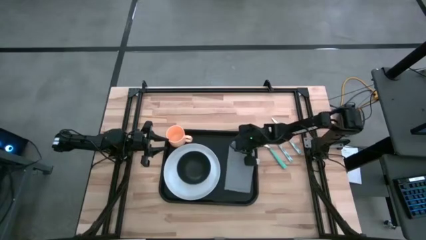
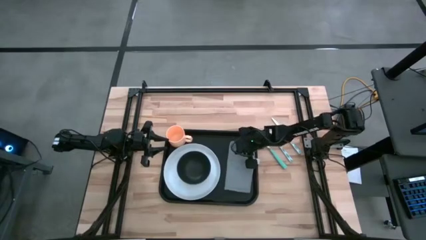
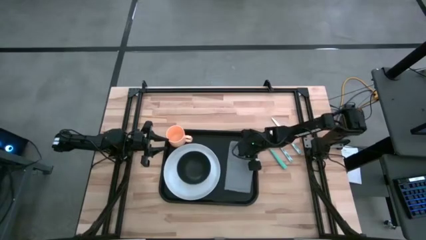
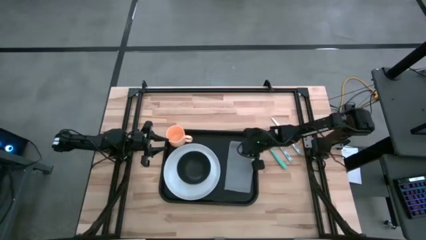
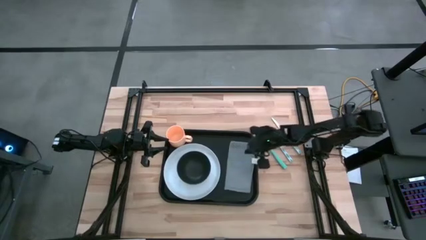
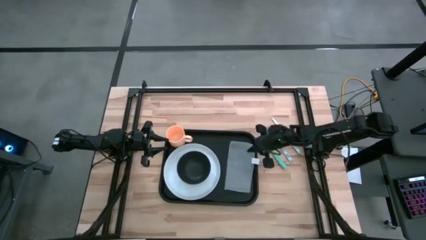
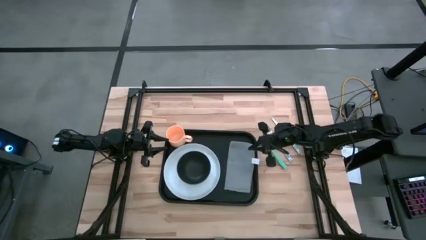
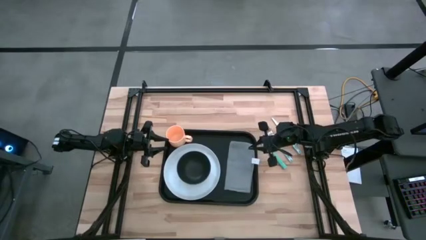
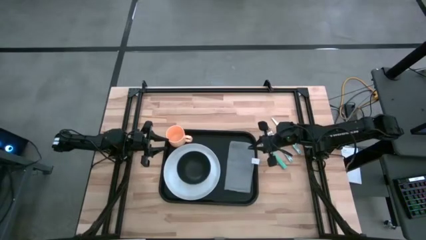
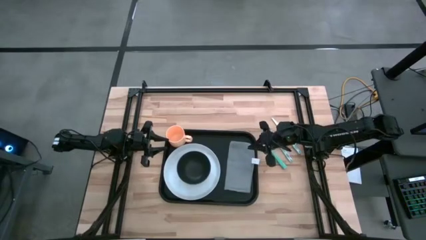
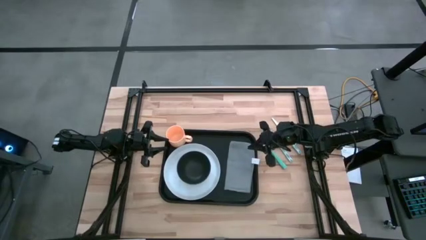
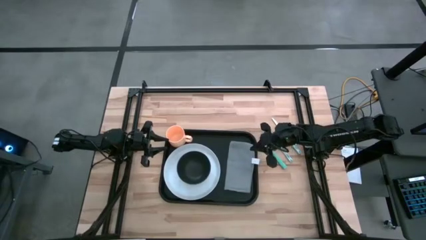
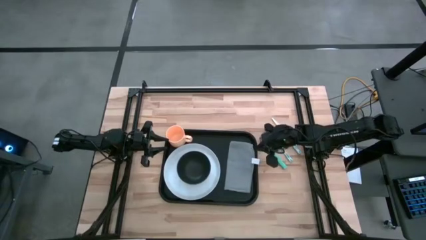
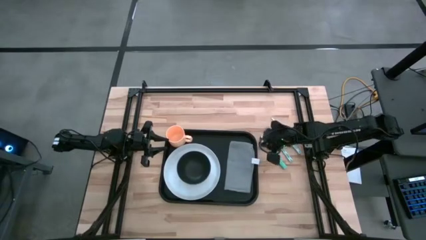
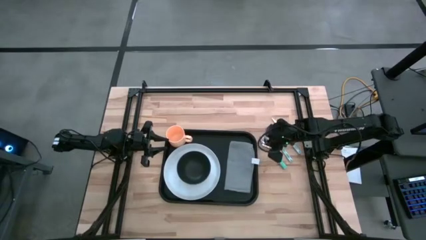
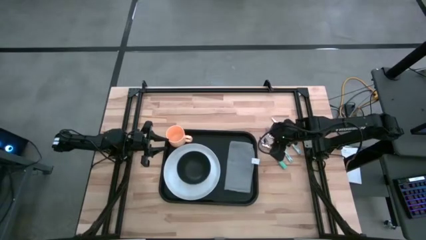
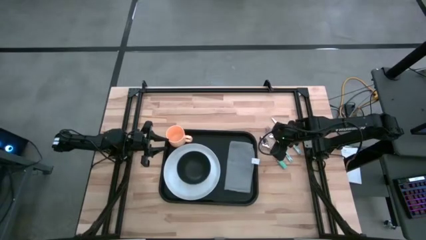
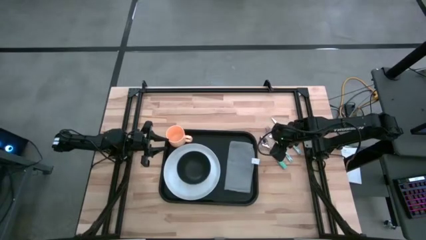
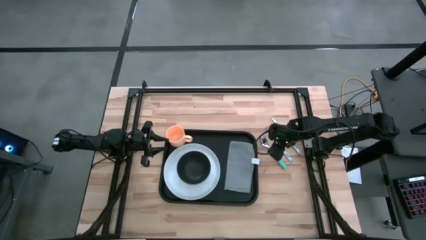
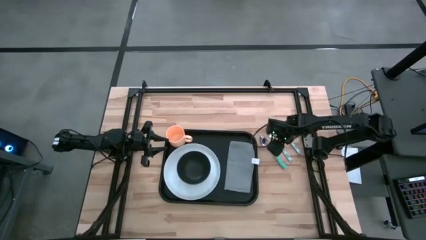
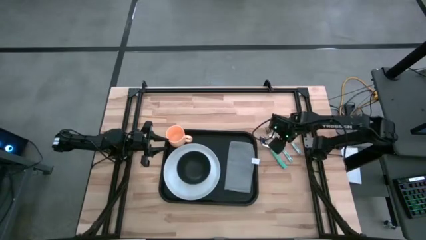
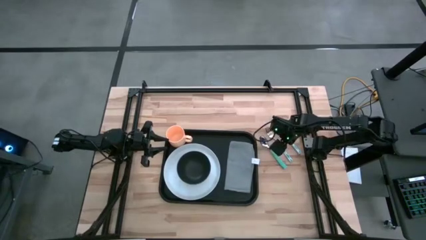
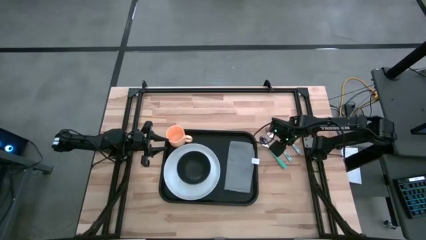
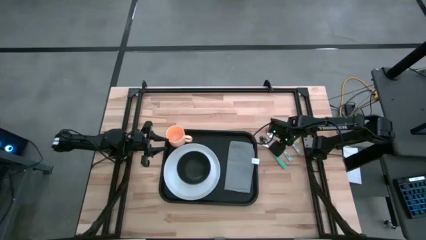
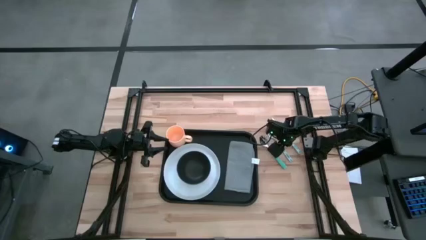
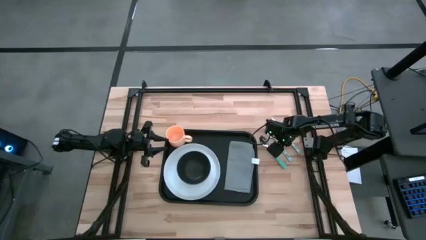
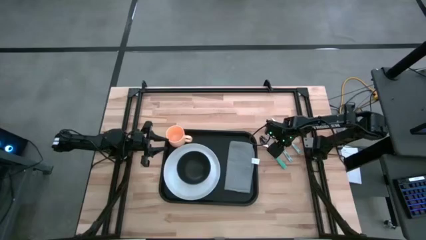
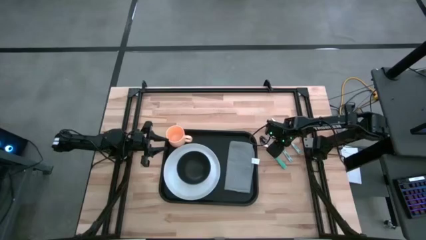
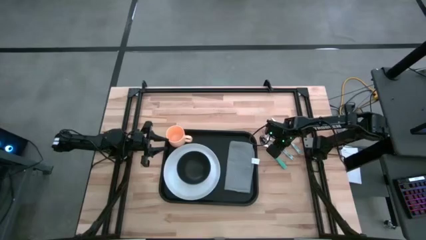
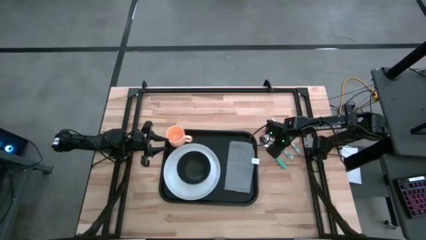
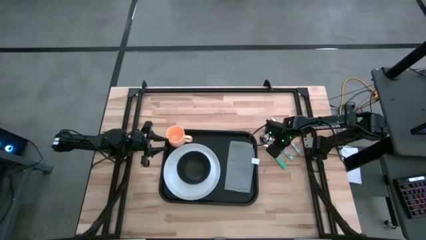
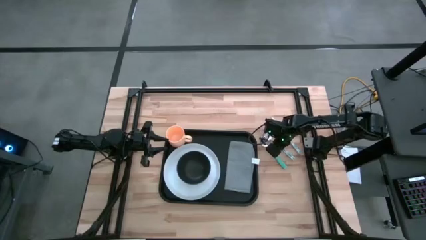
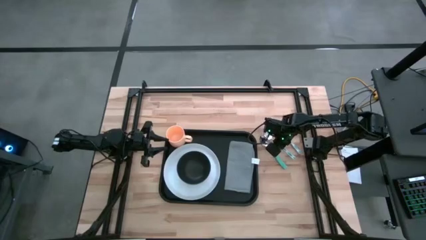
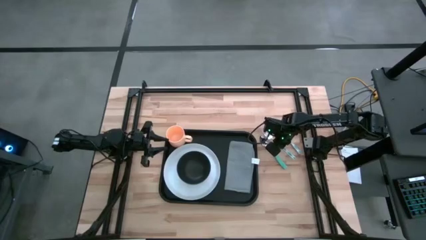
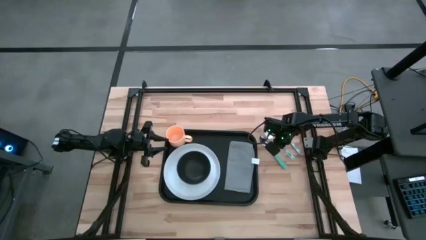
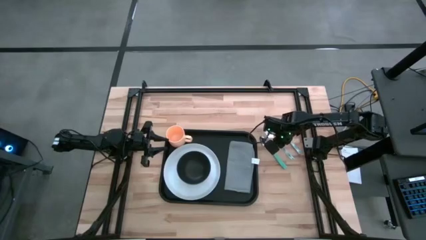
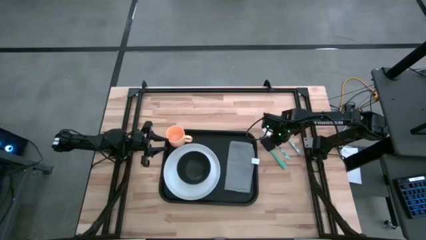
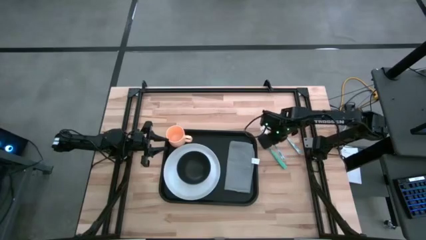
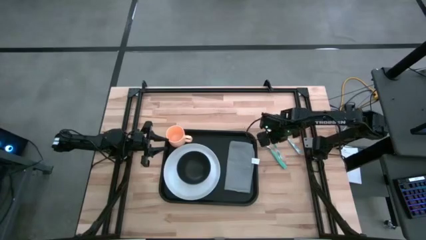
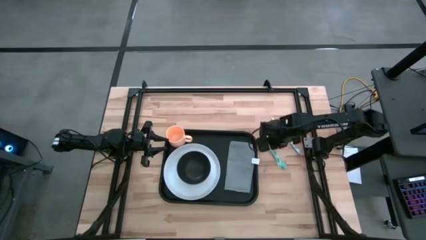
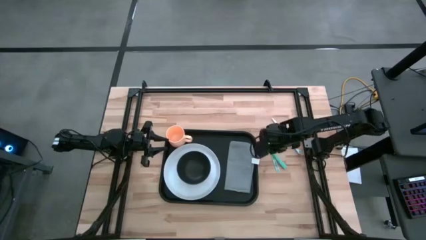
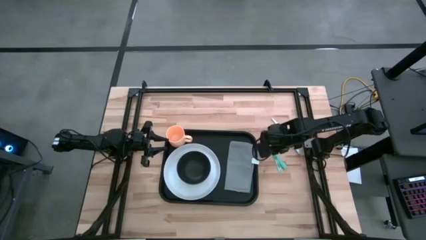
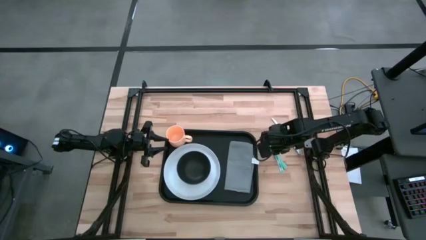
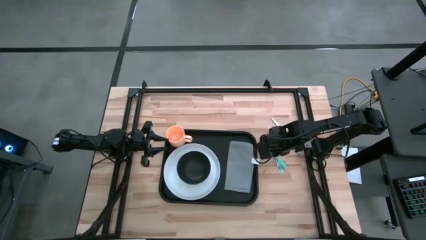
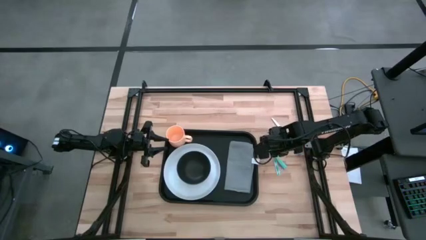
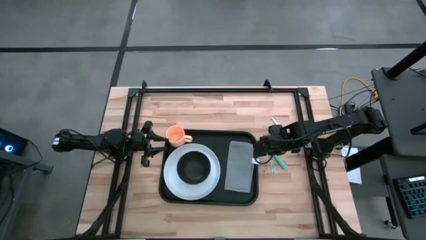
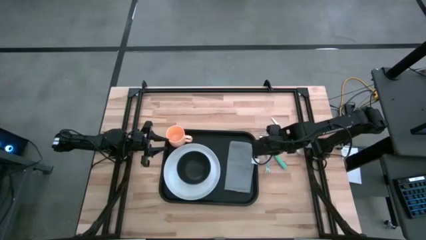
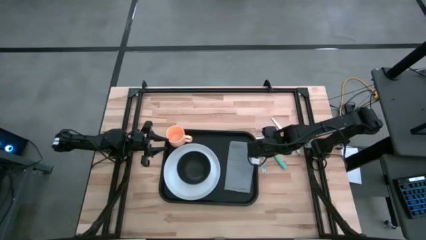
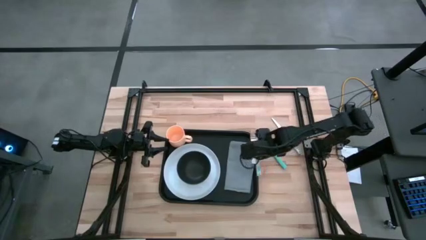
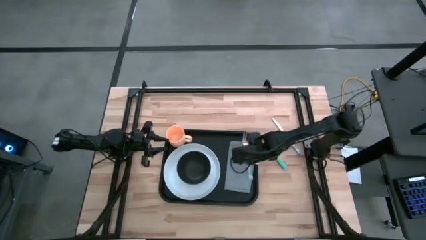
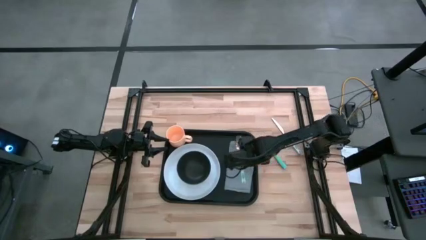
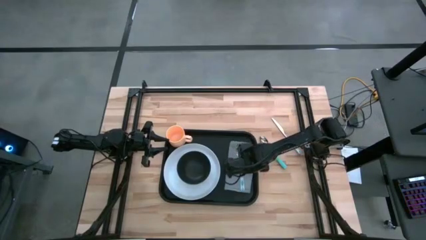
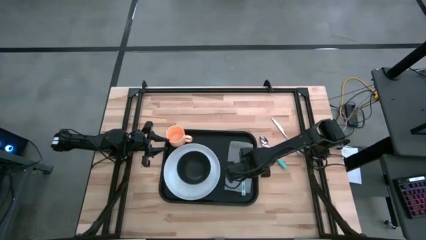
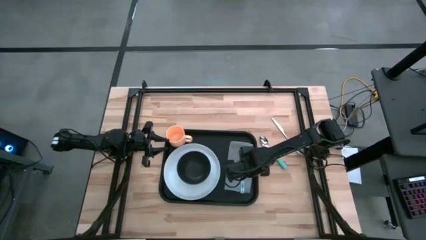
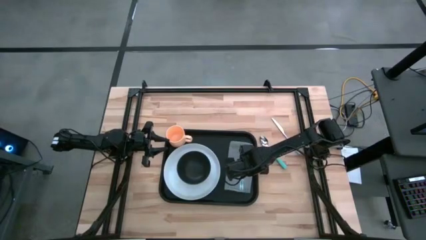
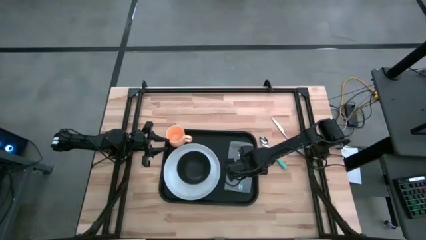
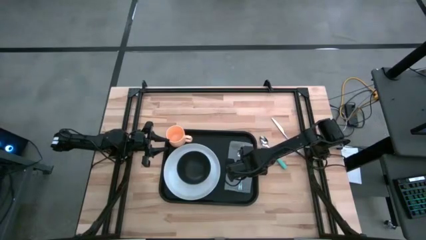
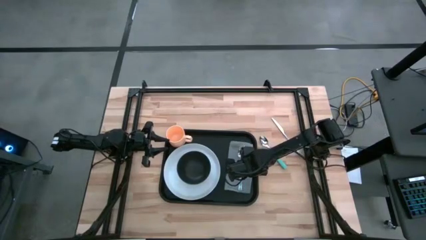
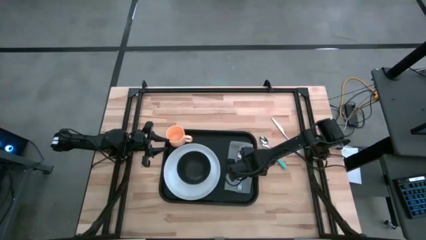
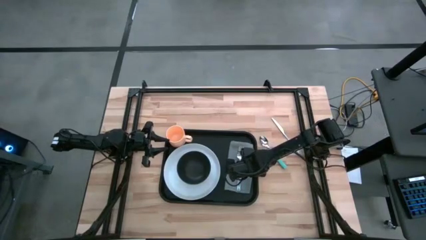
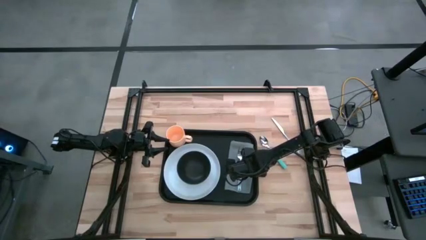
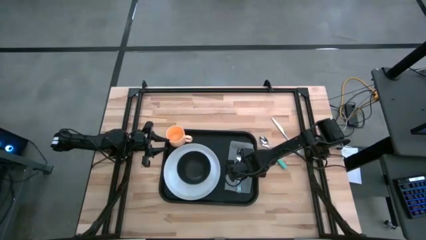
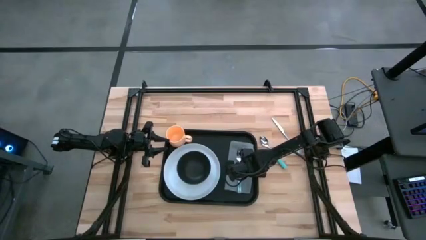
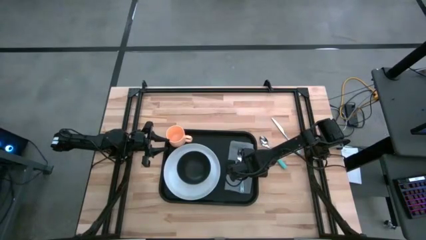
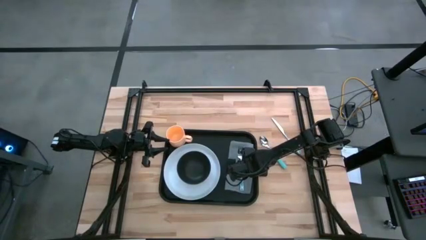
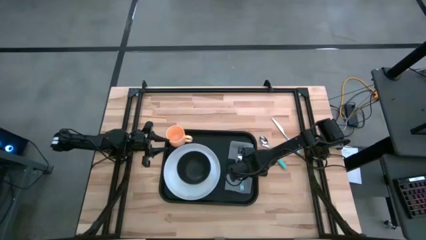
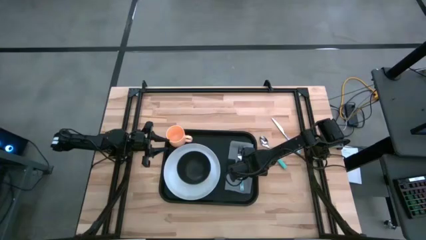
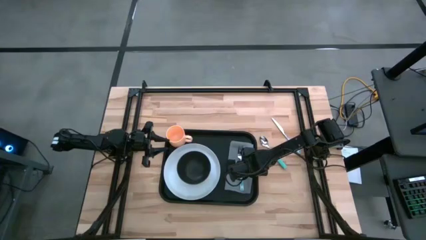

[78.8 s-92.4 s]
Task: Set up tray
Put the blue fork on top of the grey napkin

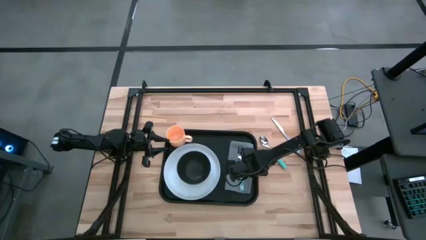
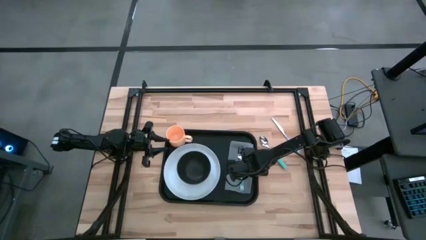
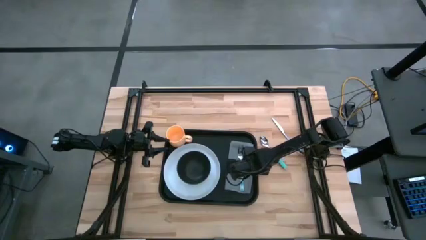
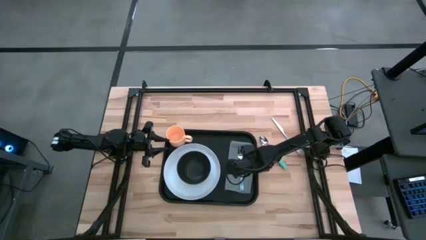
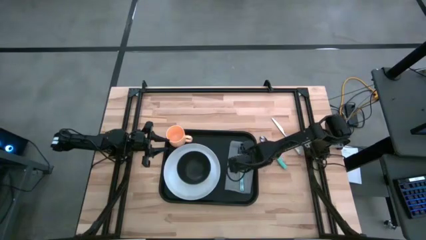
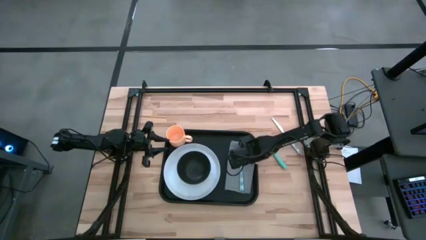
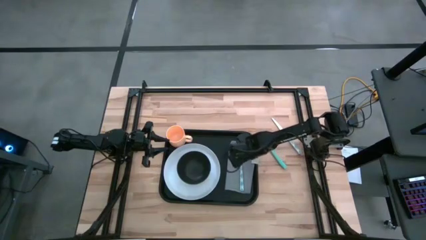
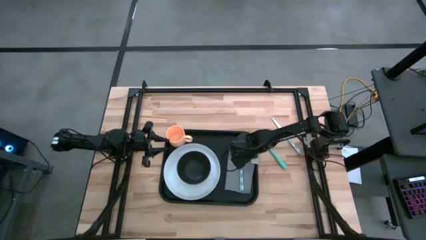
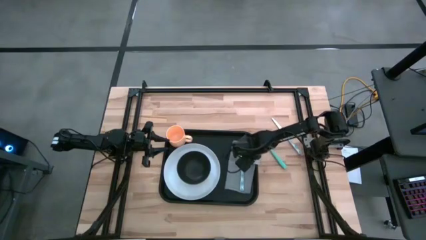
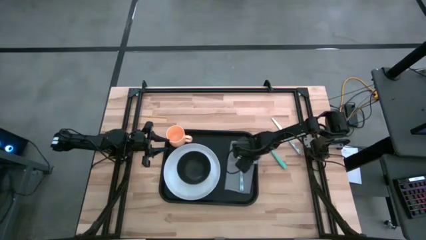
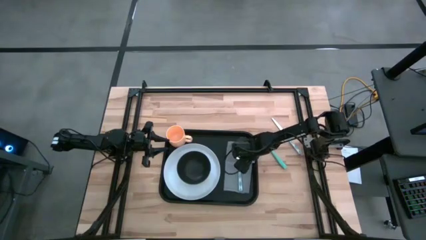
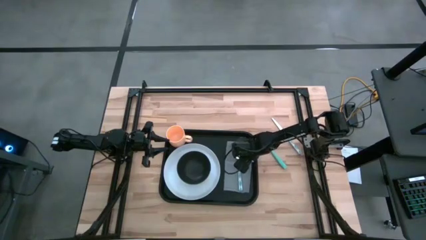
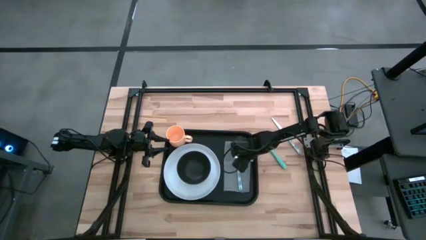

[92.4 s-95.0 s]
Adjust the grey napkin
